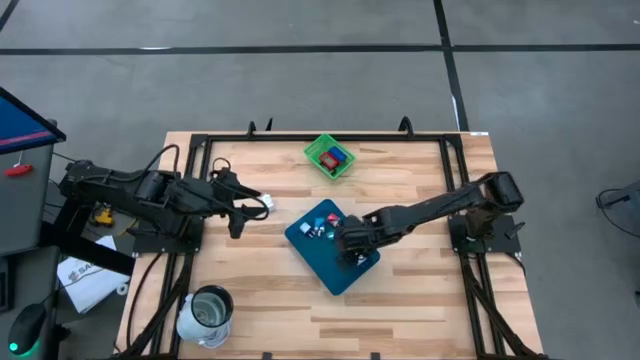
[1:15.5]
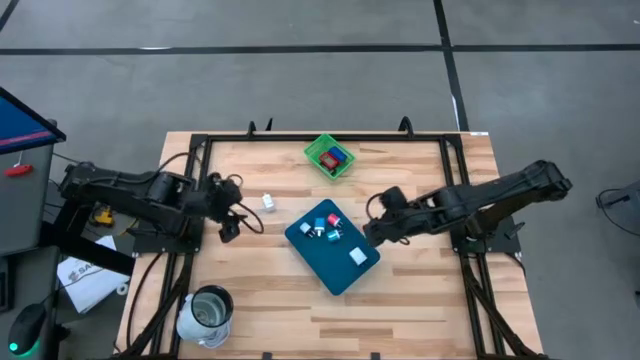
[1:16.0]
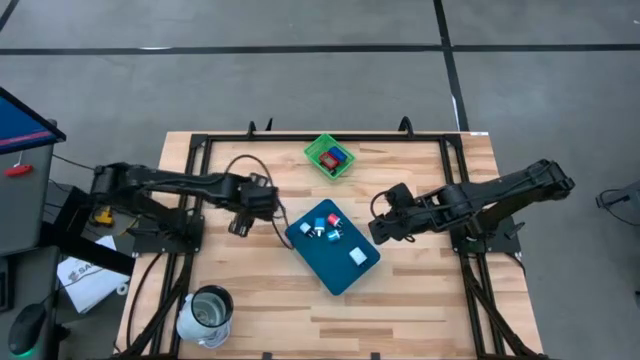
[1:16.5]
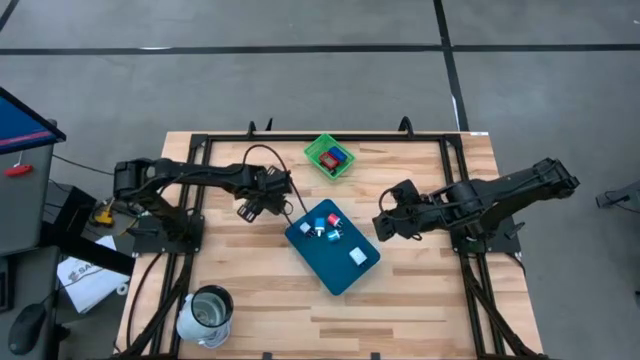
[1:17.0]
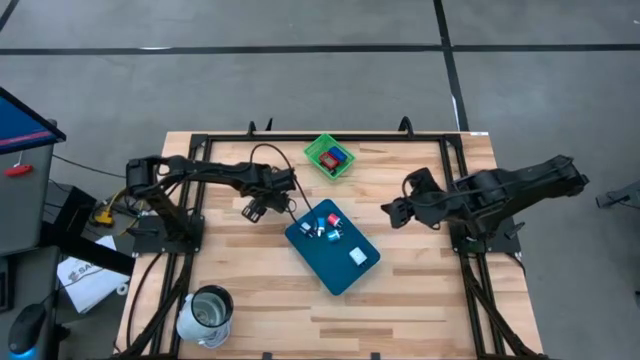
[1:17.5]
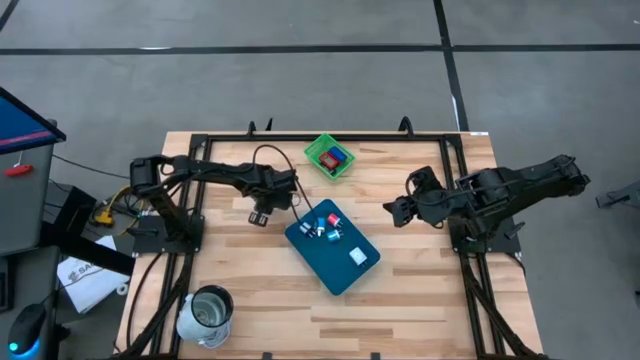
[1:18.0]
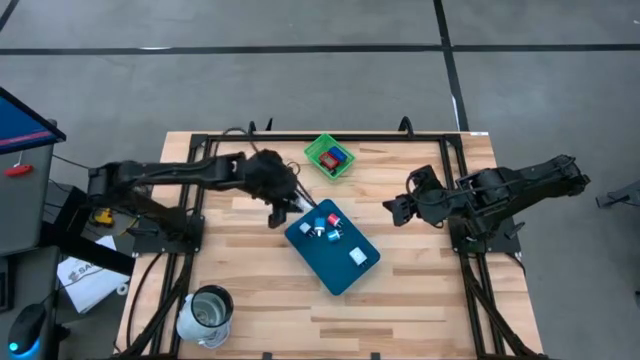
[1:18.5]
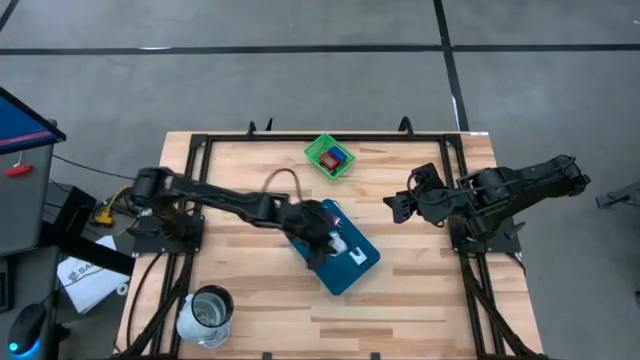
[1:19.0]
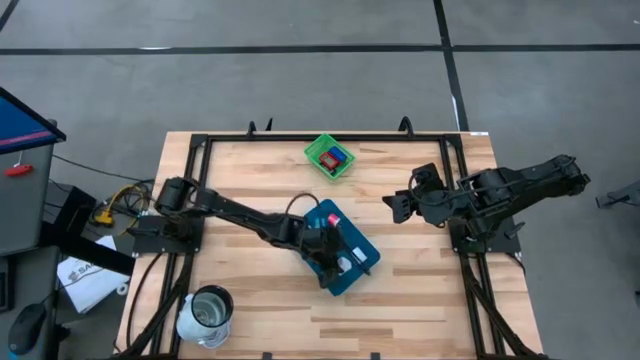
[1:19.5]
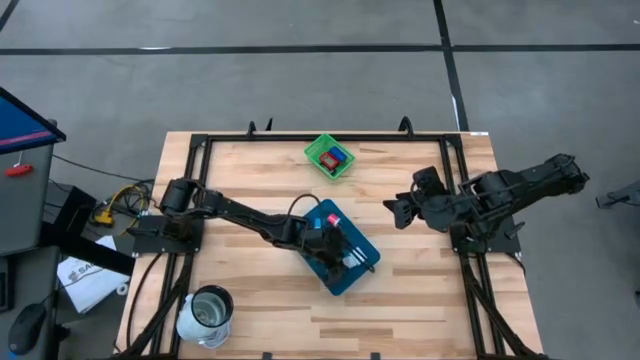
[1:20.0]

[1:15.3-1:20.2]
Task: Pick & Place Office items
Put the white charger adapter into the blue bin

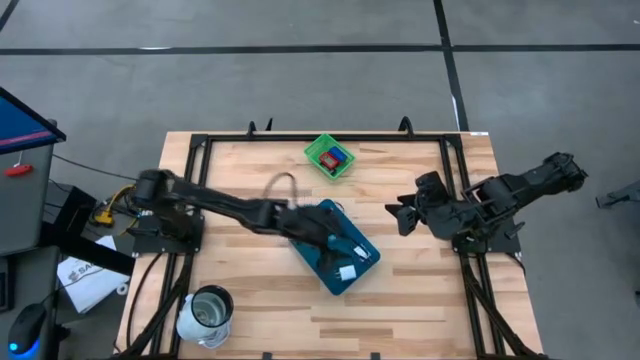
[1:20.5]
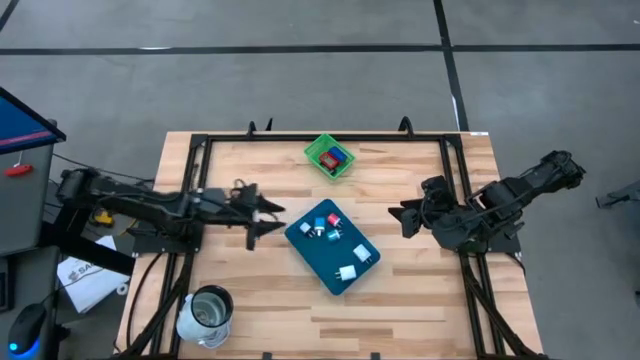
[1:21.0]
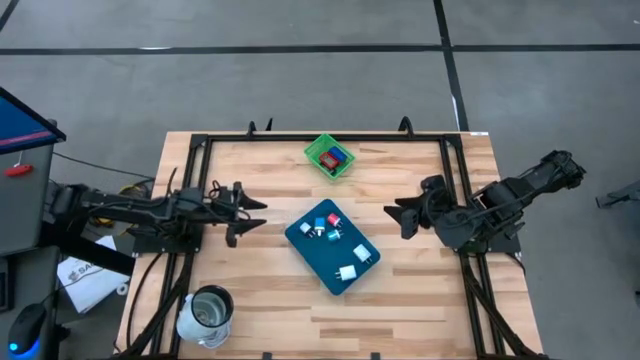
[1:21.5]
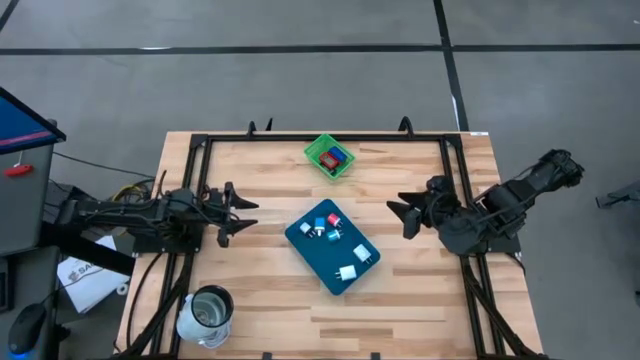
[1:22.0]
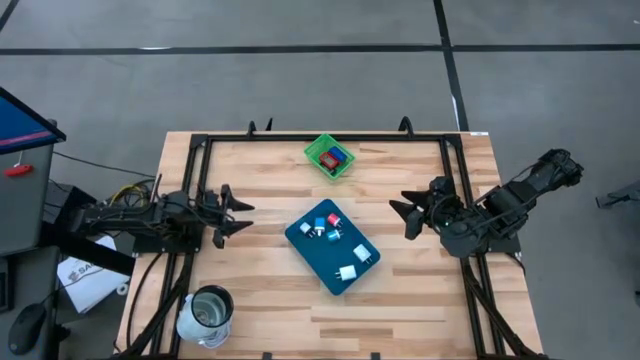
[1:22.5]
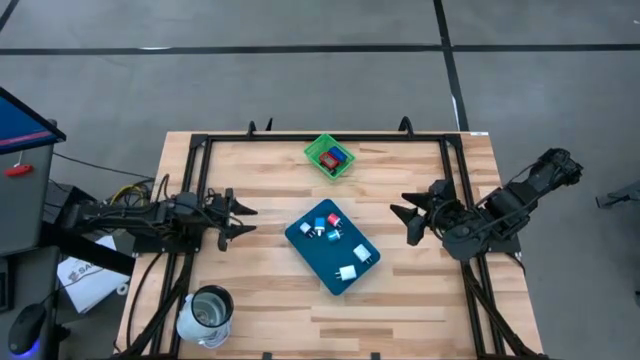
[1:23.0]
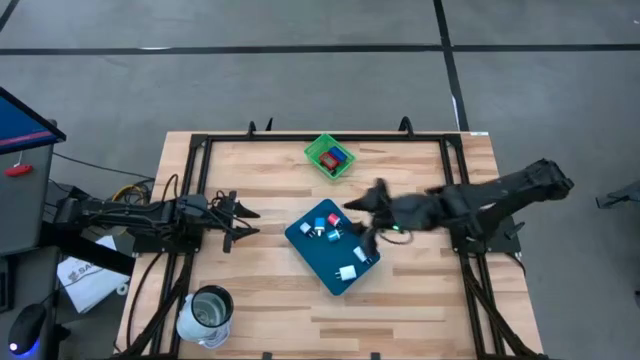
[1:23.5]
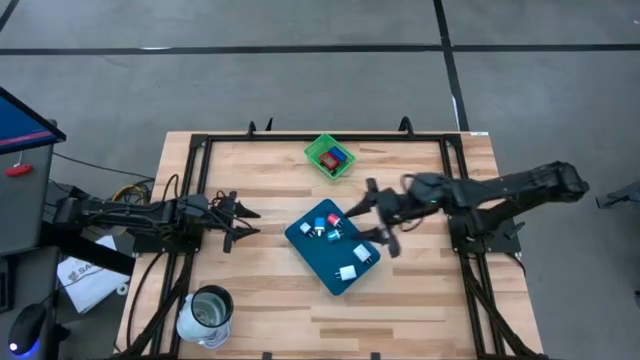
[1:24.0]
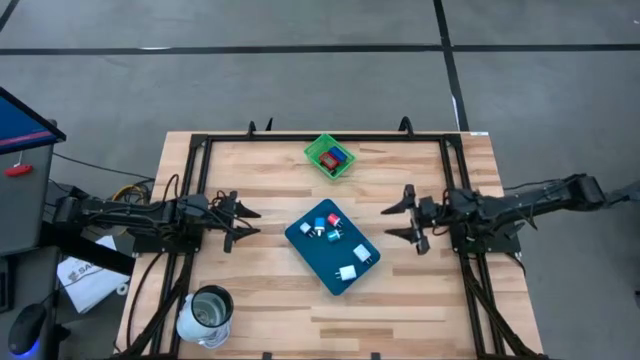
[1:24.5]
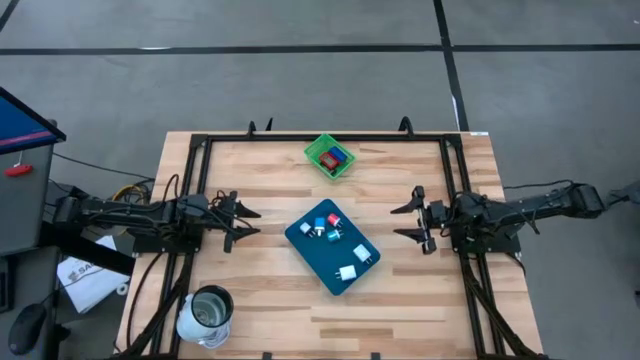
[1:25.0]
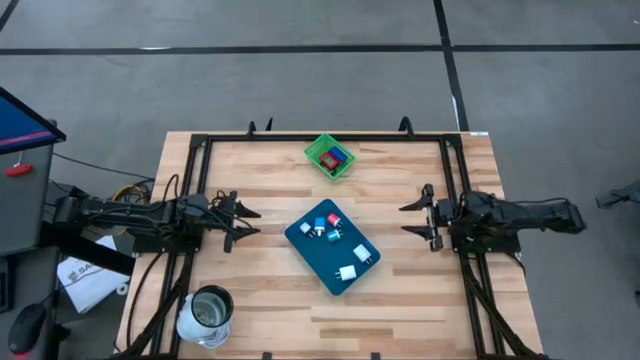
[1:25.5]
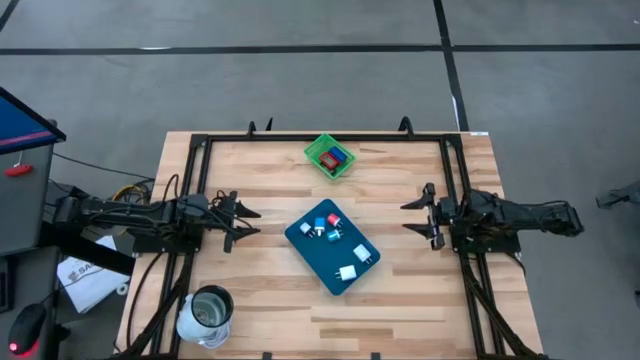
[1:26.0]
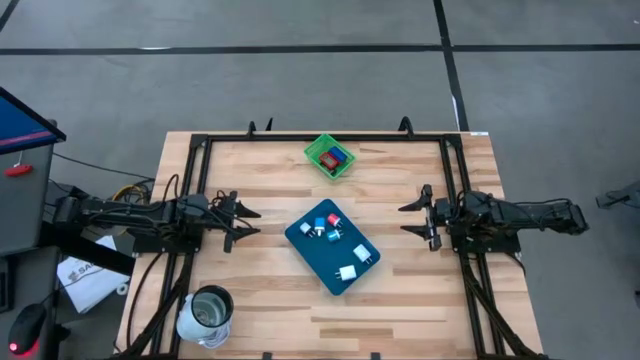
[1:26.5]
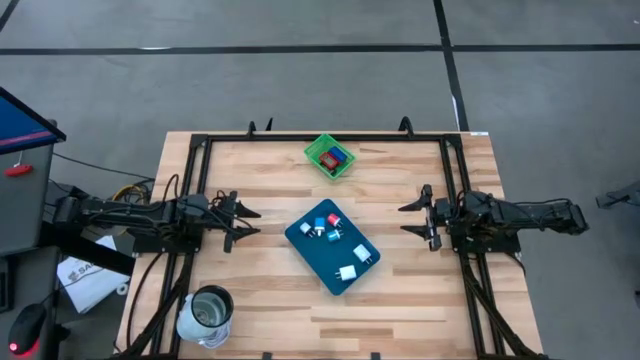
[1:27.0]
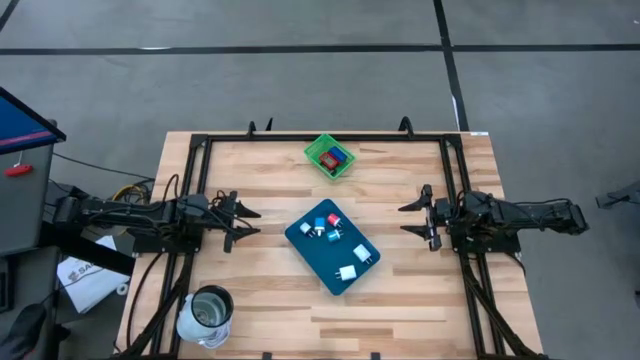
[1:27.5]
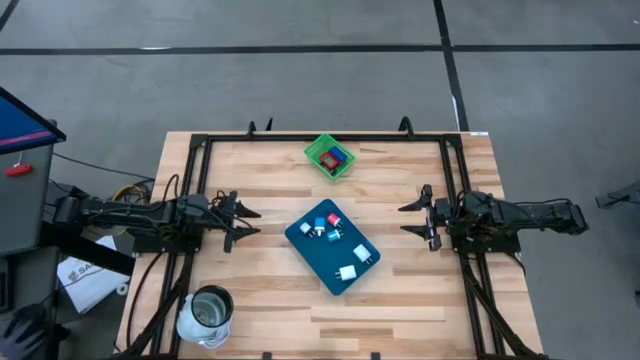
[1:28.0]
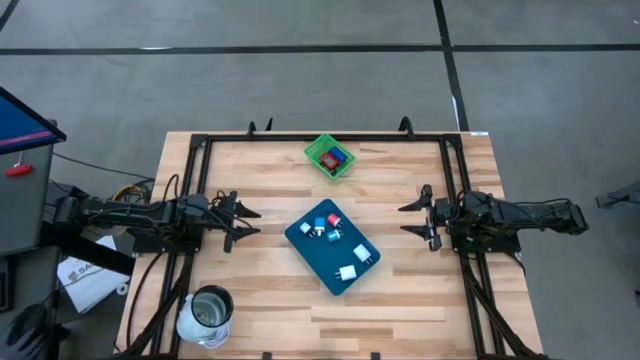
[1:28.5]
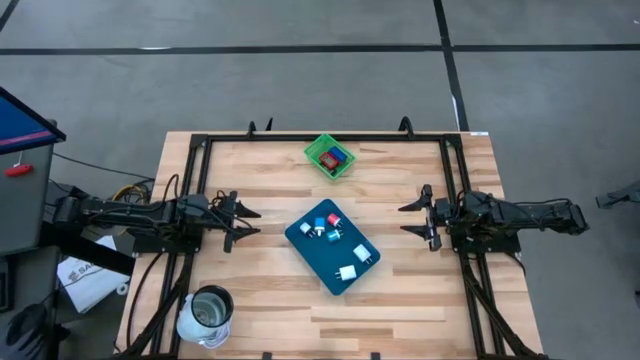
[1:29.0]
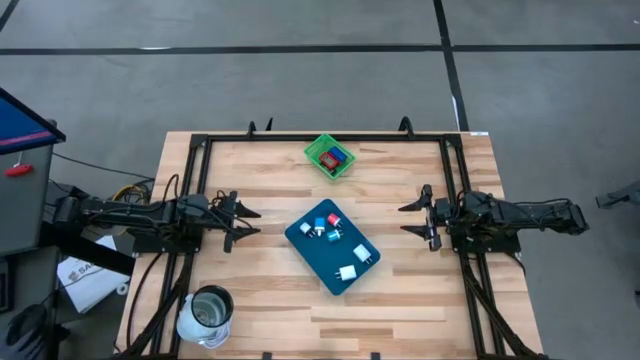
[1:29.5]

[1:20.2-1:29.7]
Return to Home Position

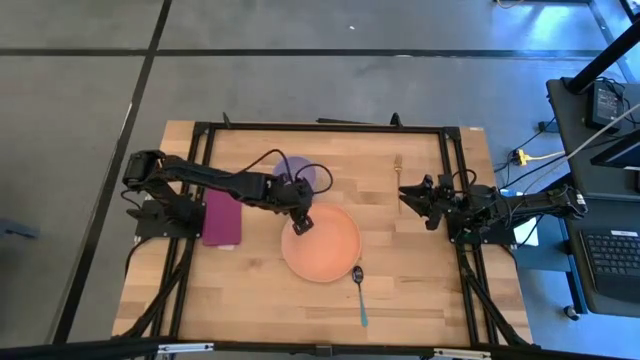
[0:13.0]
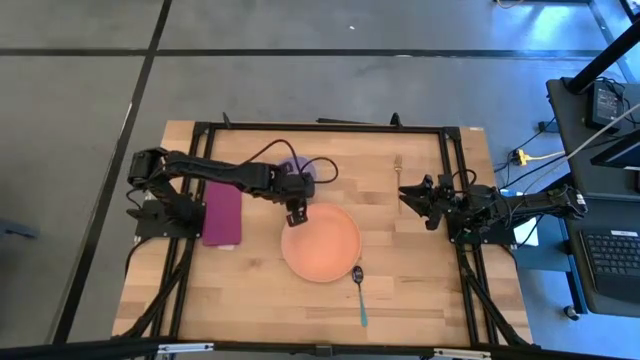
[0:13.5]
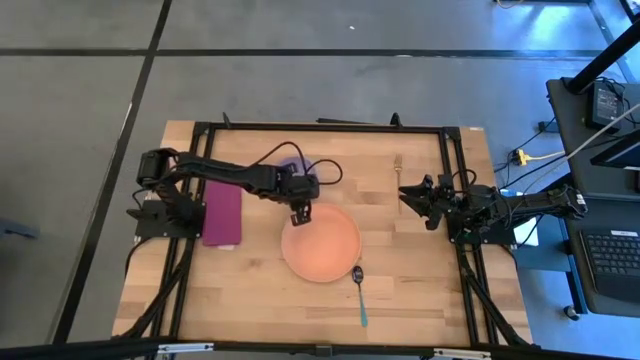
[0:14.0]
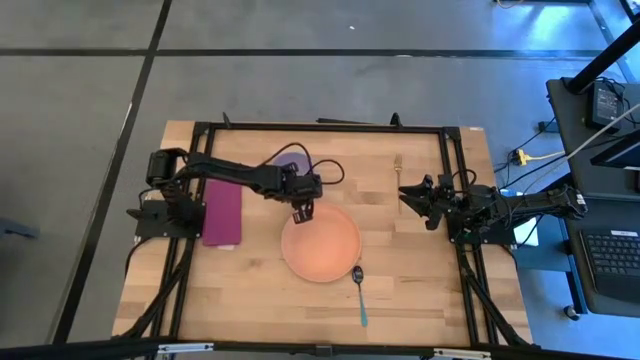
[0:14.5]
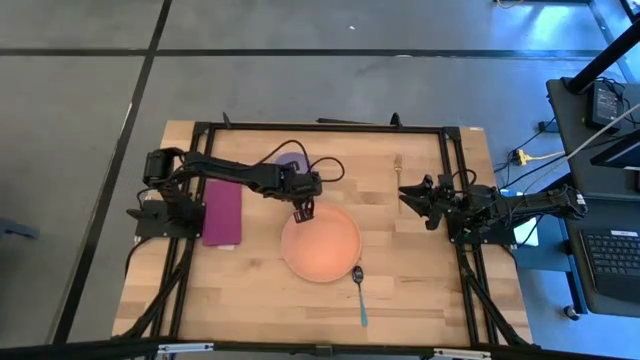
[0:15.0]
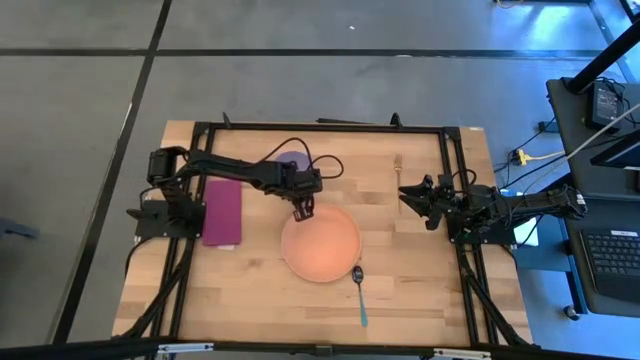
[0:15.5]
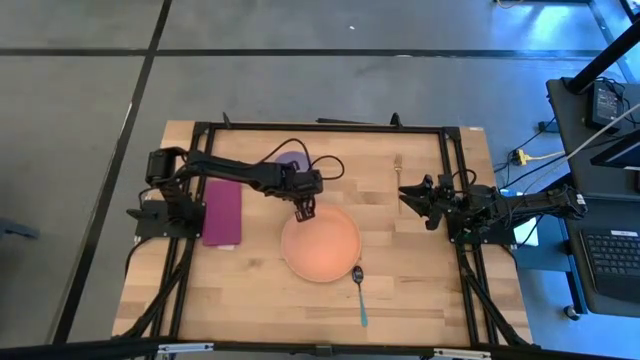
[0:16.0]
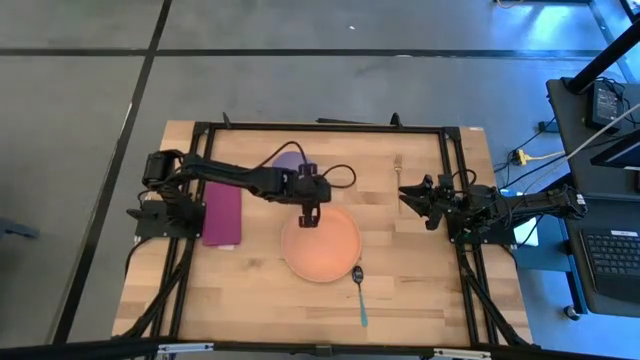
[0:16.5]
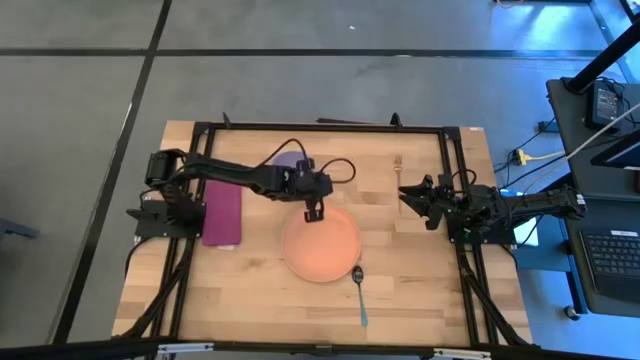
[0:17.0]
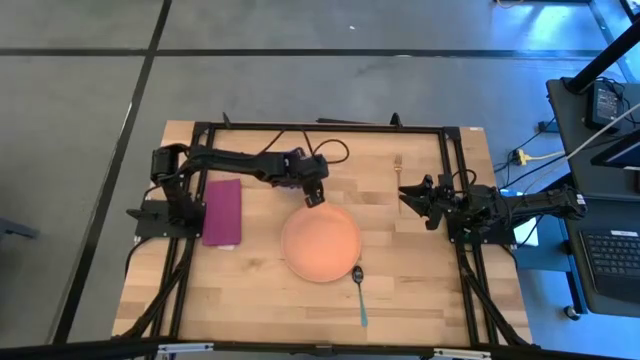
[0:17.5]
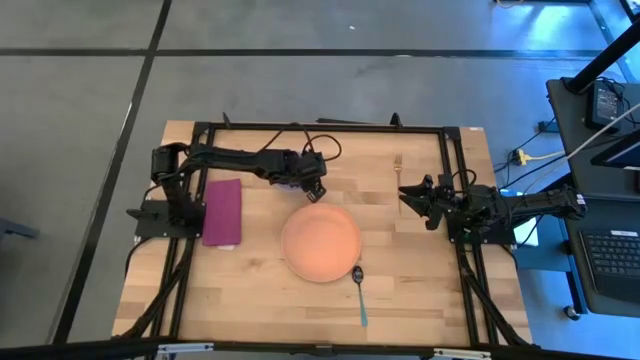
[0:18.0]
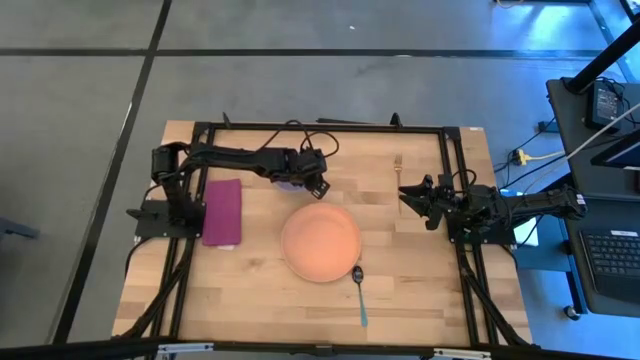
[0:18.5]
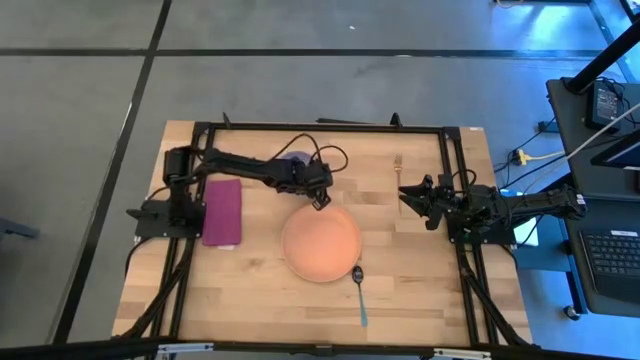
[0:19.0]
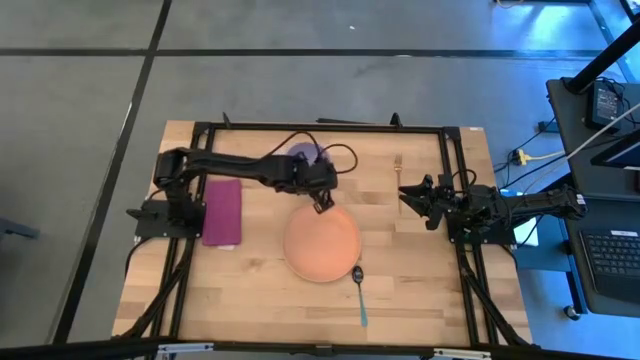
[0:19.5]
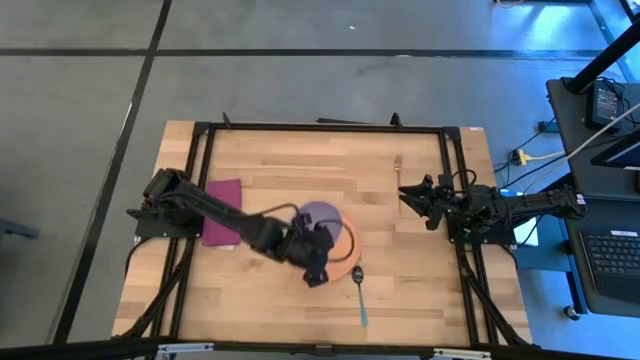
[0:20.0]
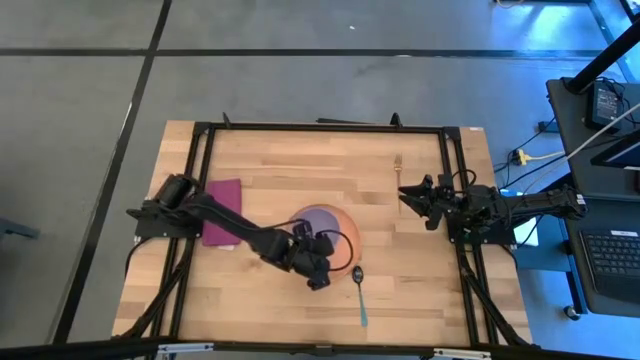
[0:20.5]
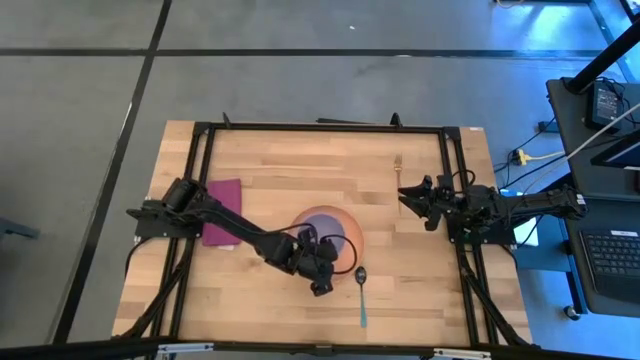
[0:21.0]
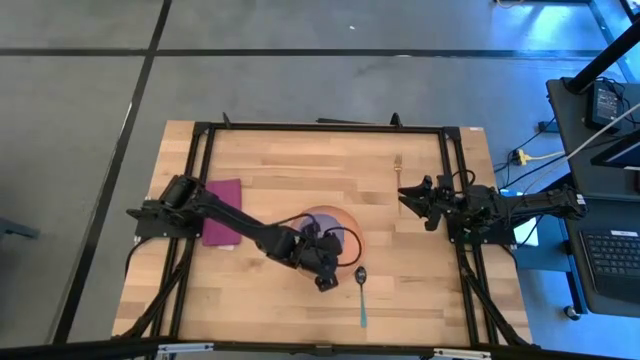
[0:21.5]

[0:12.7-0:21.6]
Task: Set table place
Put the violet bowl on the orange plate
